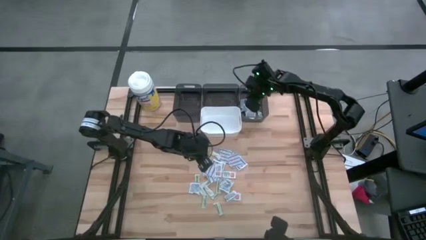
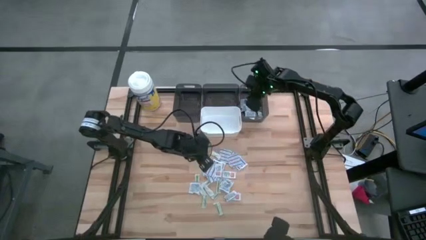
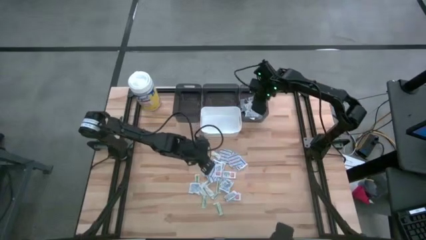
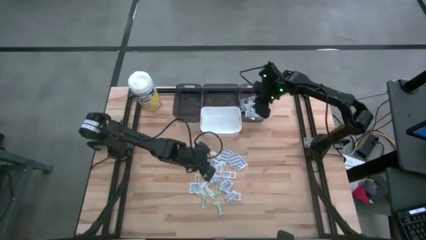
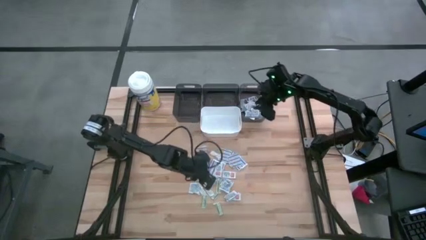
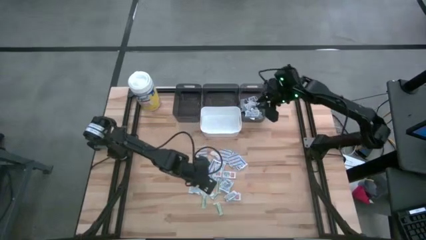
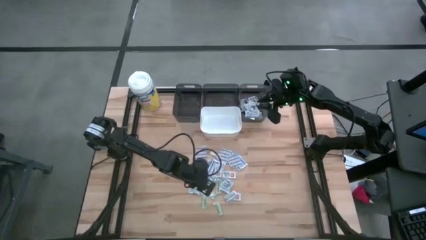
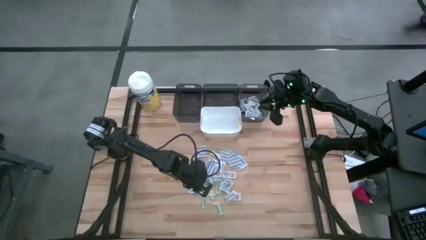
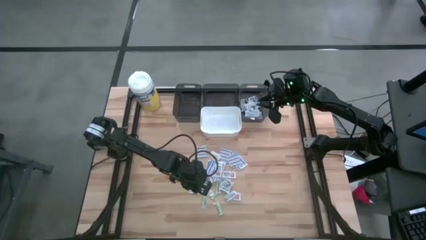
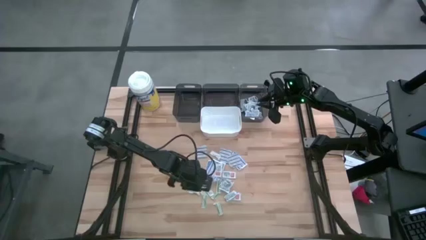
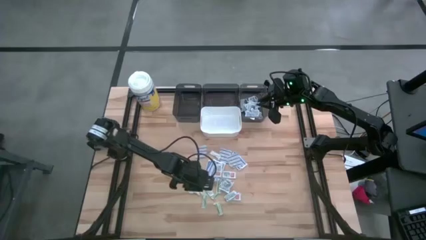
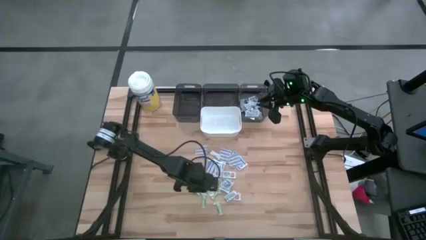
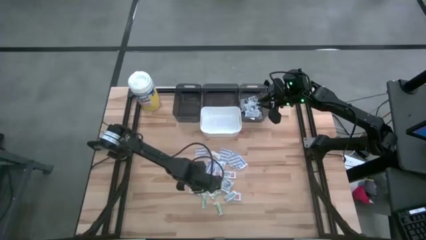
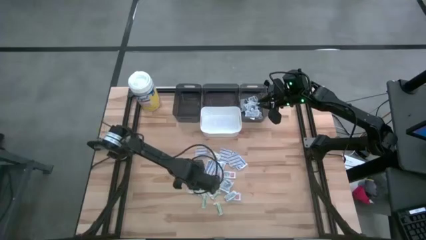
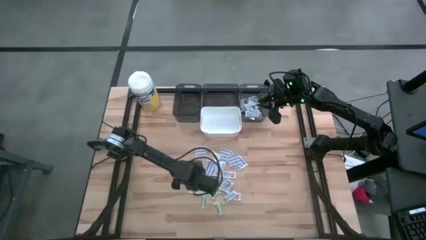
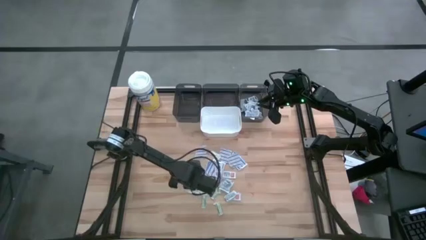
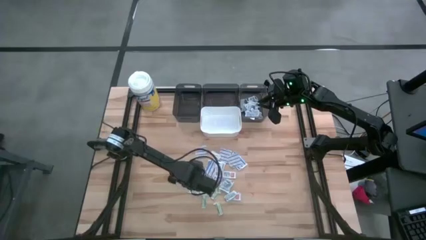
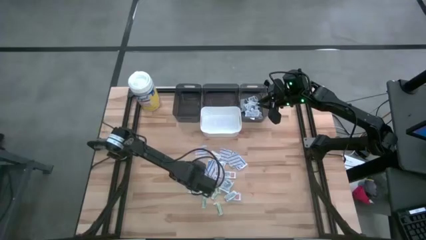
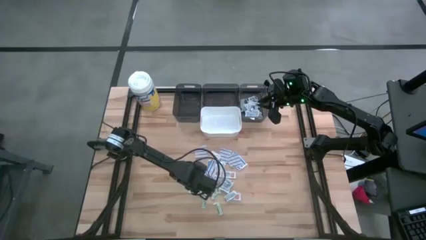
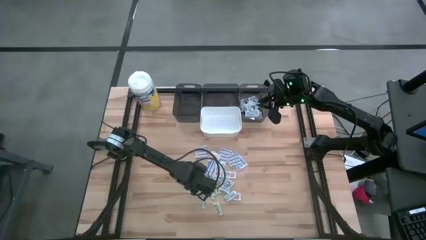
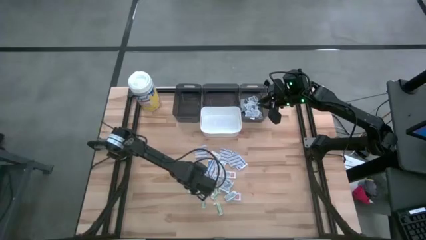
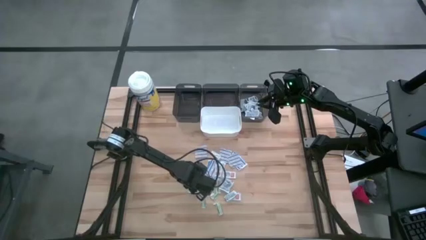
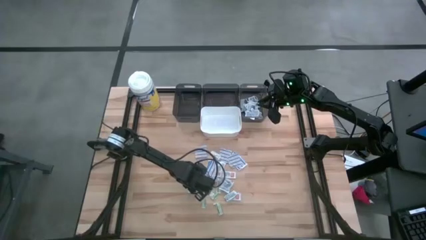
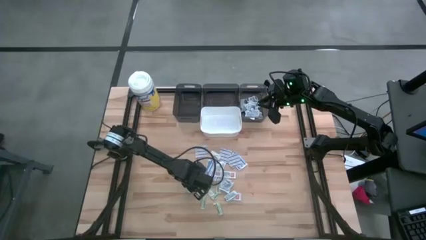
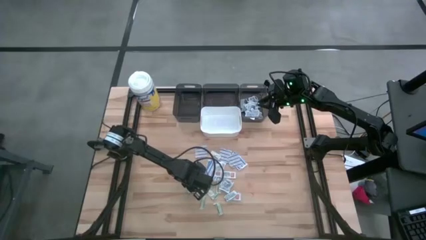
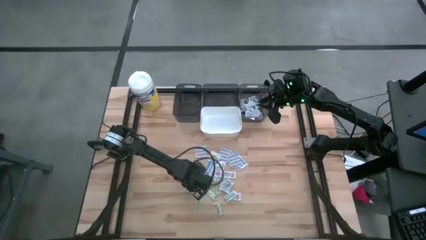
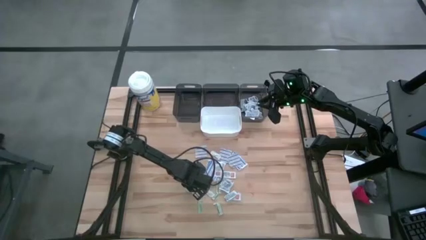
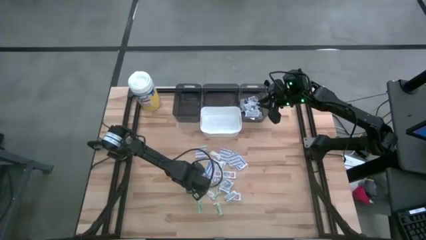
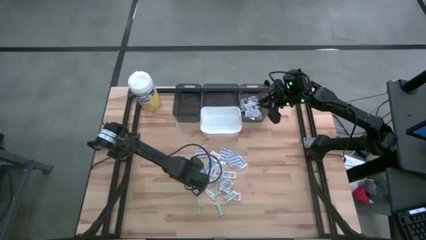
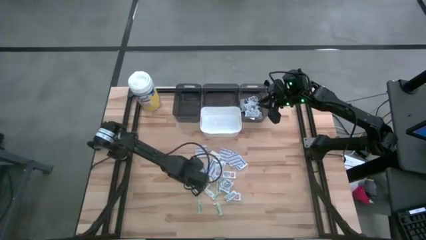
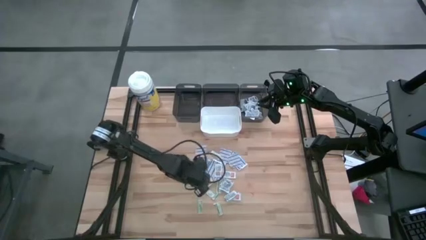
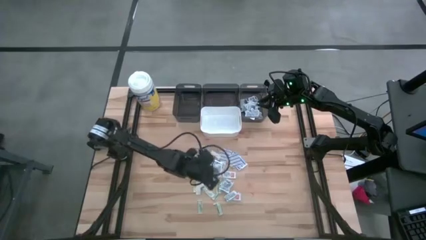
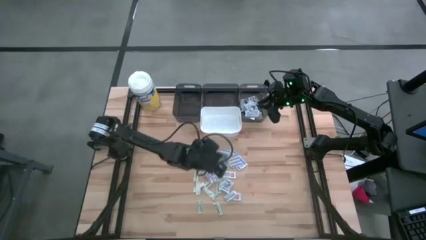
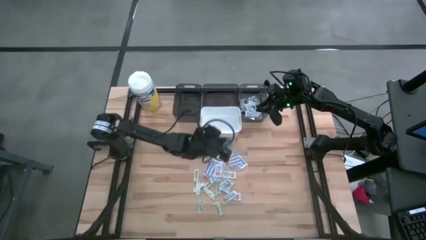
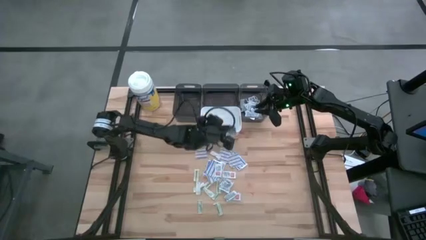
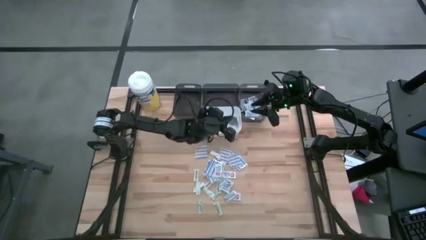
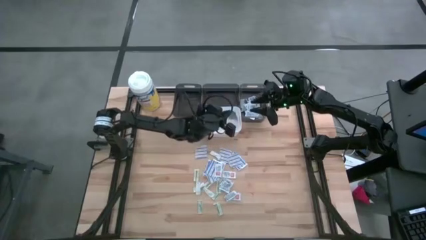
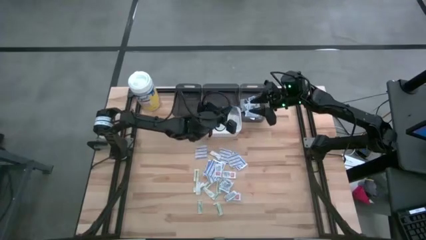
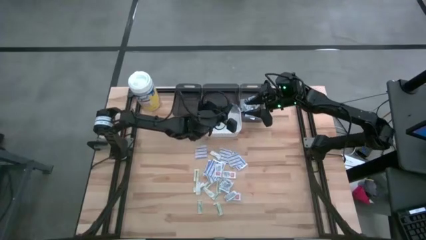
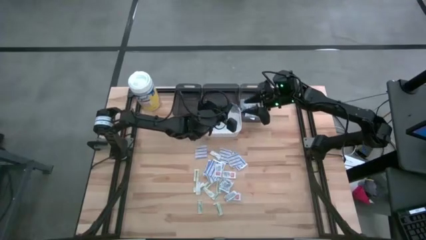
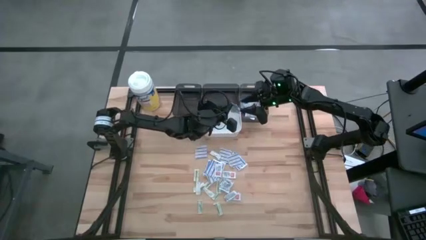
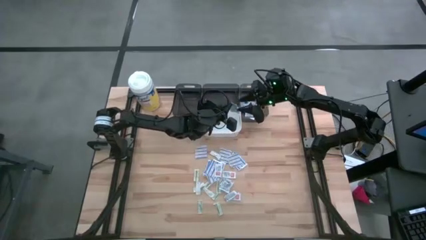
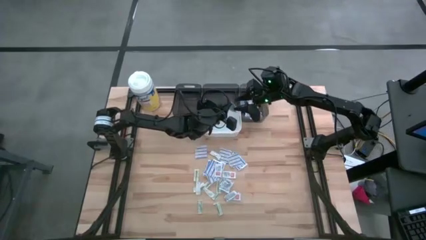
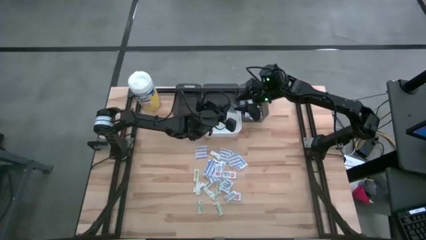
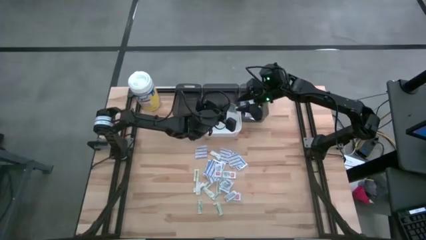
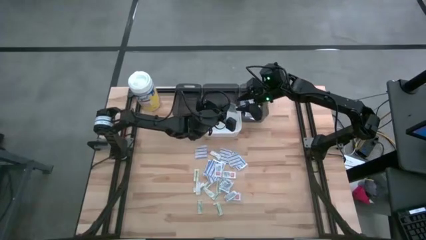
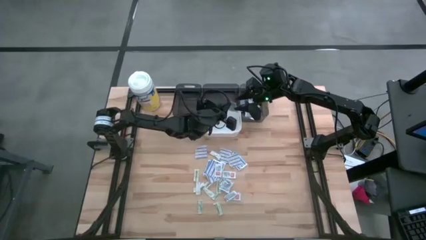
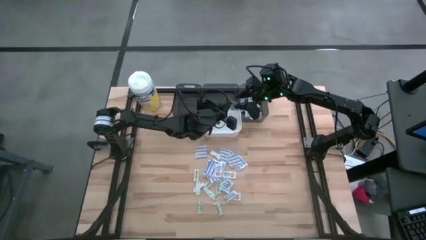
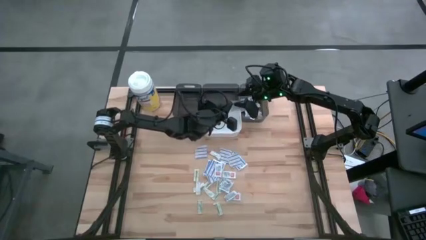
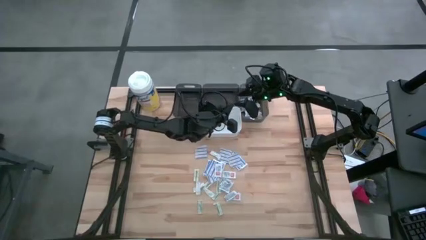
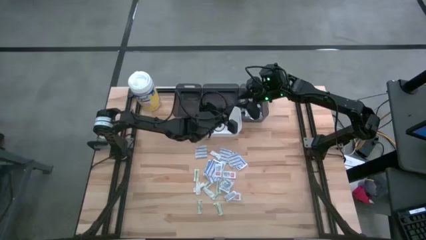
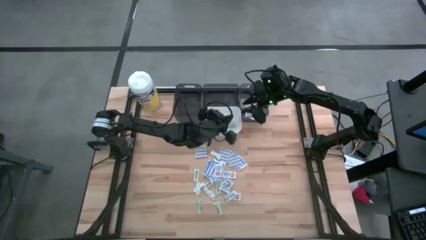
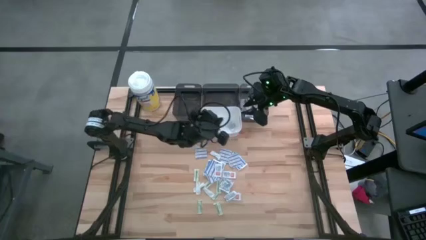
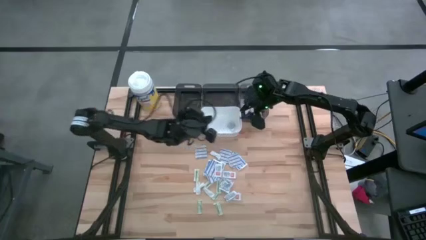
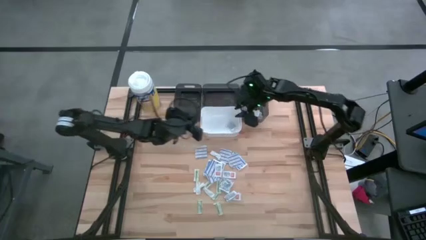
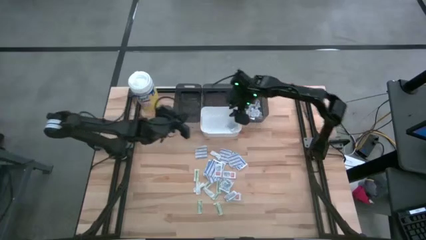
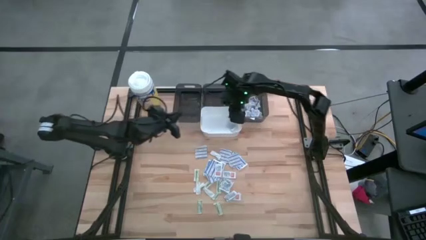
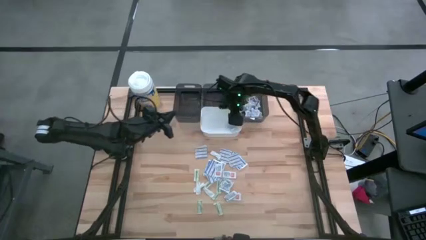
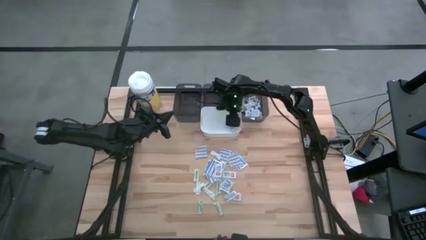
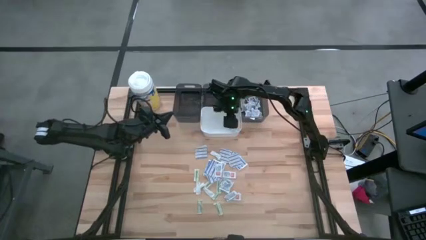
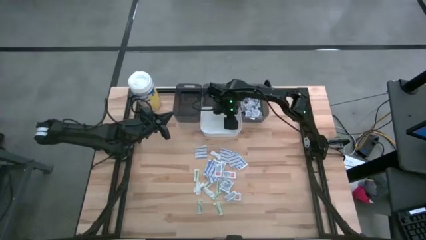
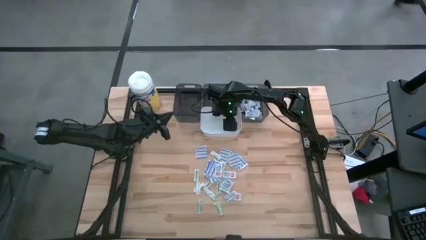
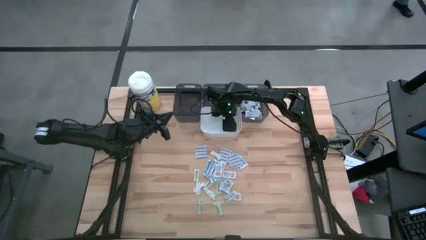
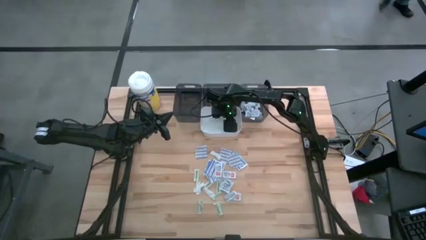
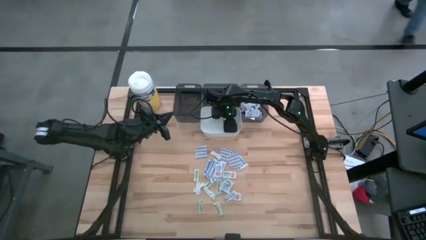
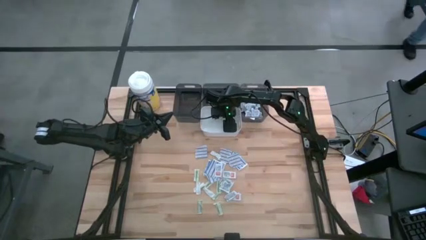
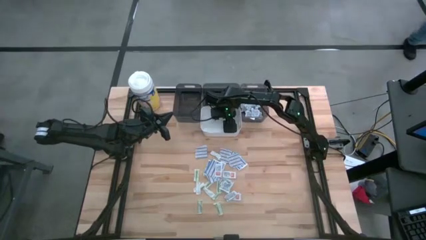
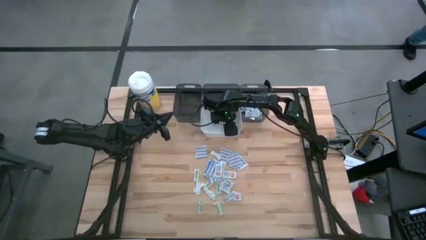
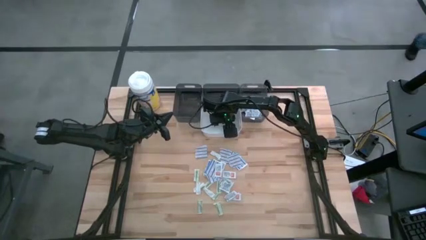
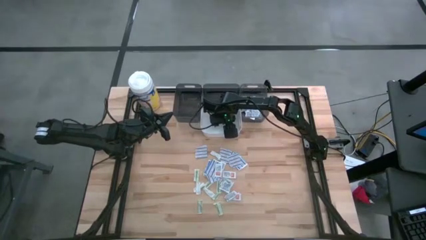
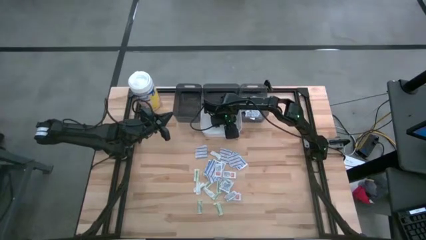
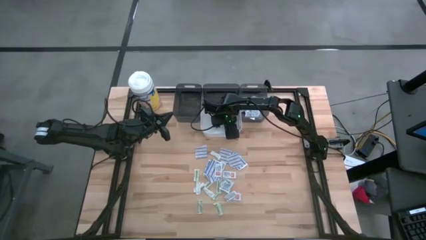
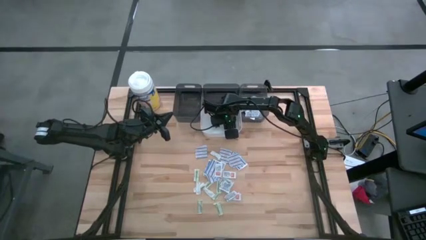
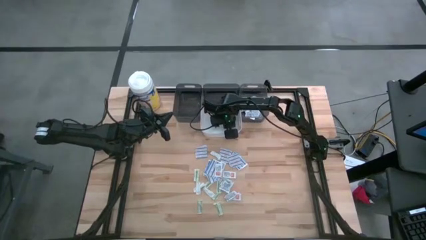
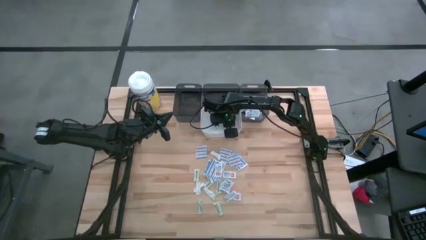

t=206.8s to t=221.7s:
Task: Pick & Place First Aid Supplies
Put the blue alcohol pad into the right black bin

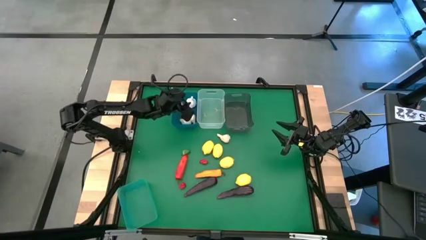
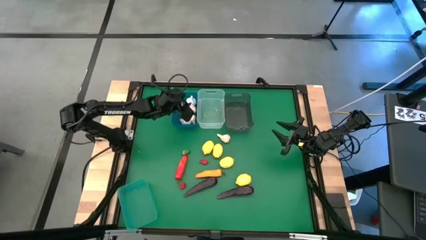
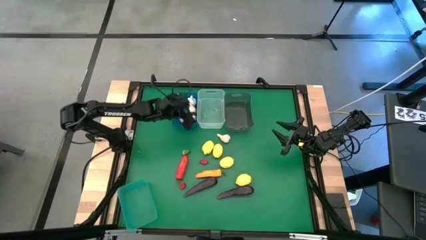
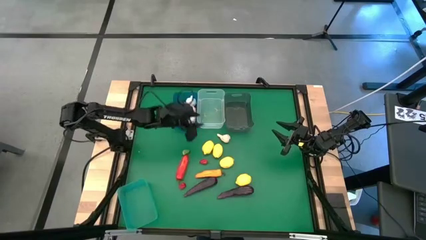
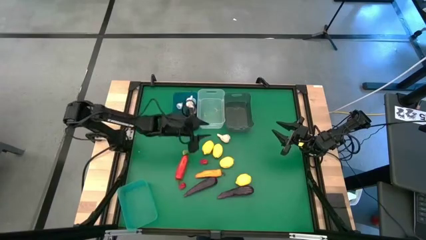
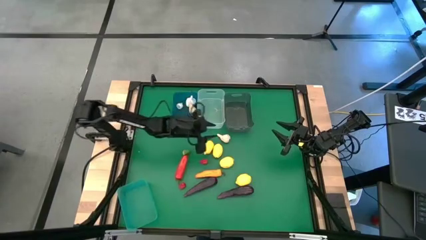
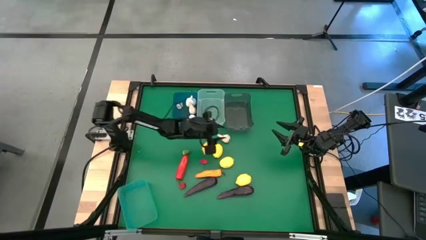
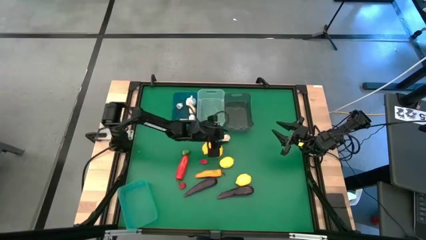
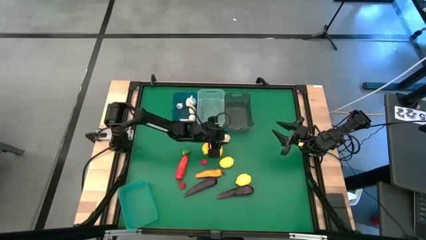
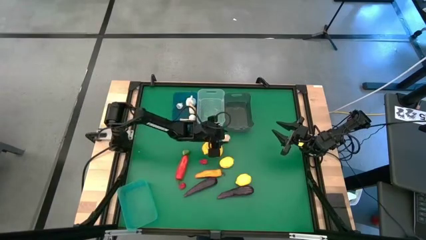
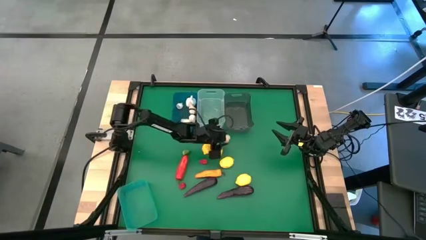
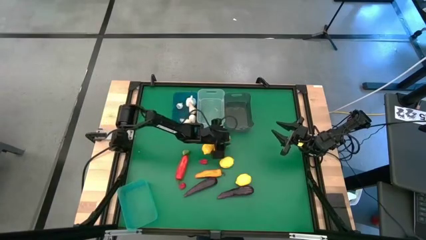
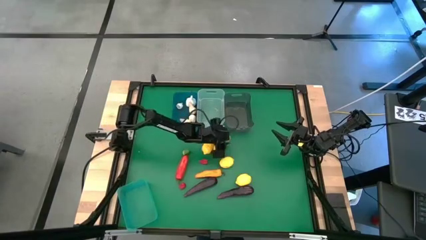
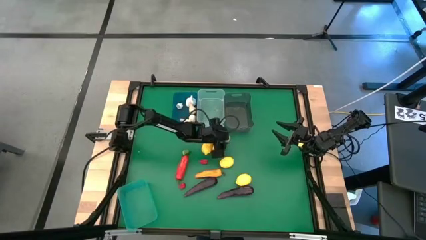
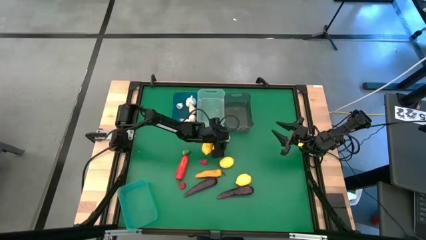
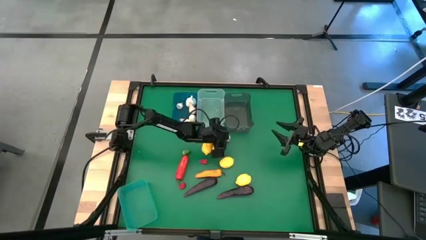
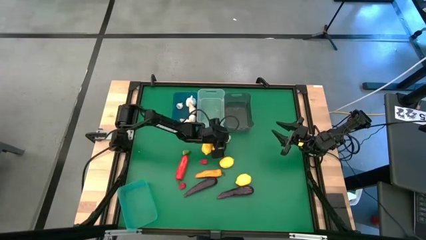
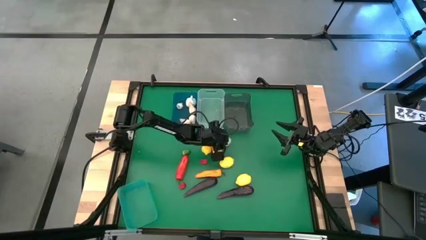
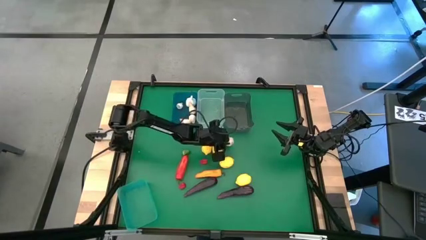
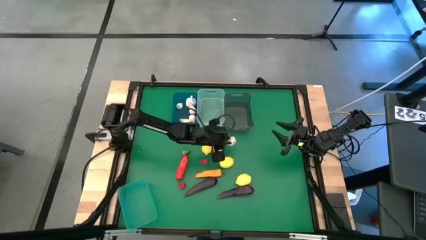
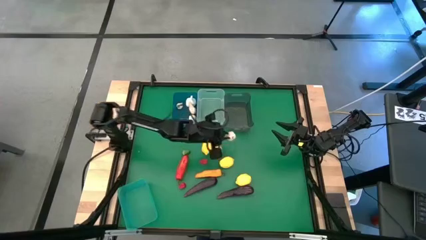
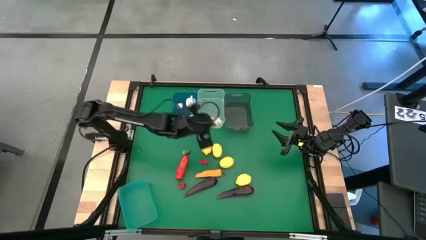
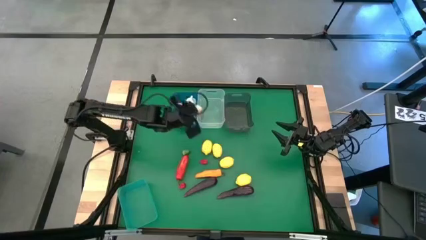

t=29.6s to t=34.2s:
Task: Sort produce into baskets
Put the white garlic into the blue bin
